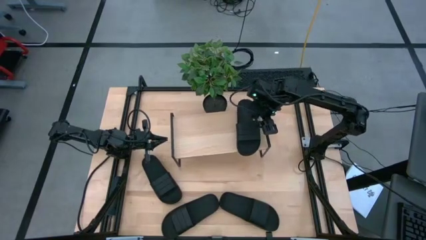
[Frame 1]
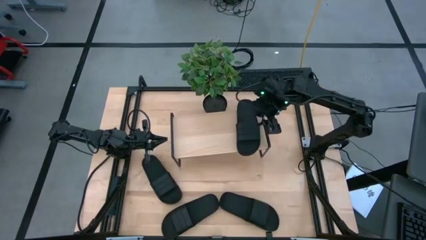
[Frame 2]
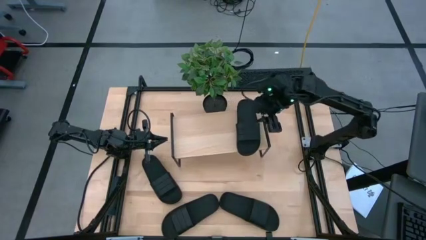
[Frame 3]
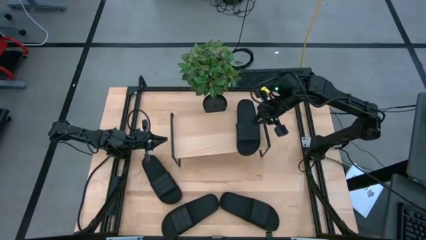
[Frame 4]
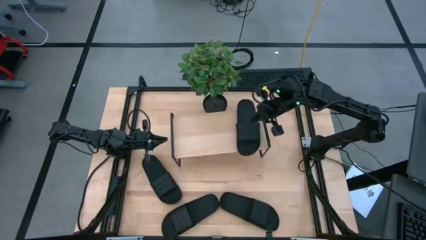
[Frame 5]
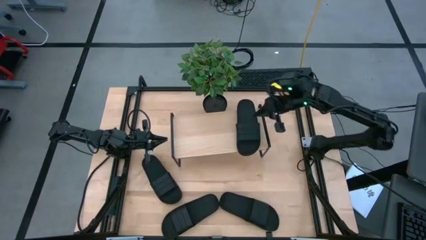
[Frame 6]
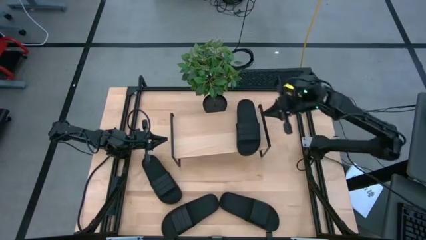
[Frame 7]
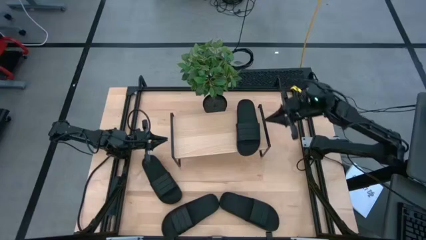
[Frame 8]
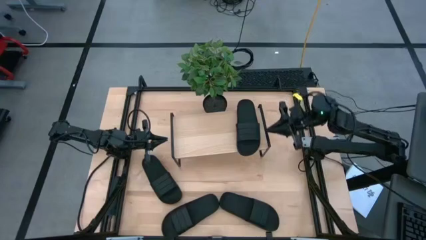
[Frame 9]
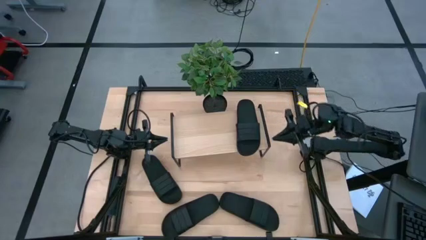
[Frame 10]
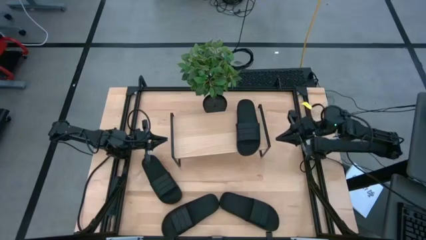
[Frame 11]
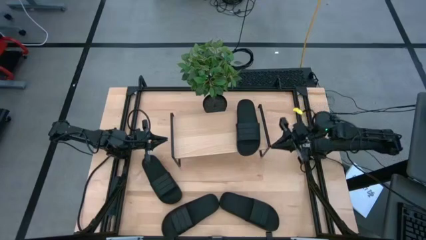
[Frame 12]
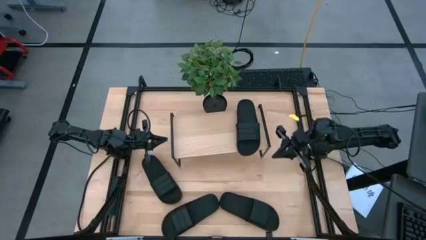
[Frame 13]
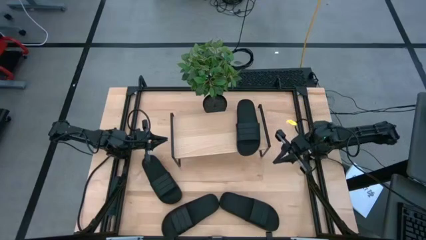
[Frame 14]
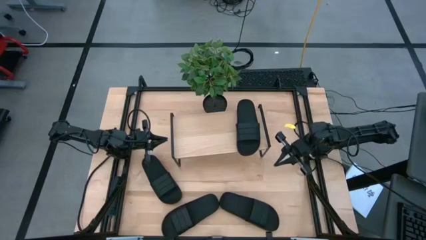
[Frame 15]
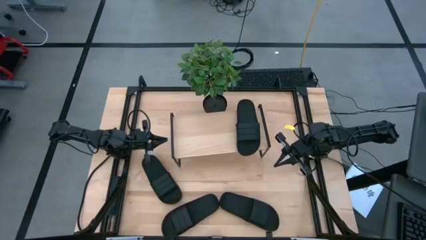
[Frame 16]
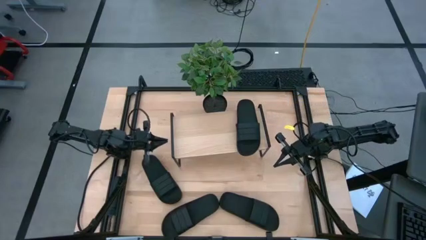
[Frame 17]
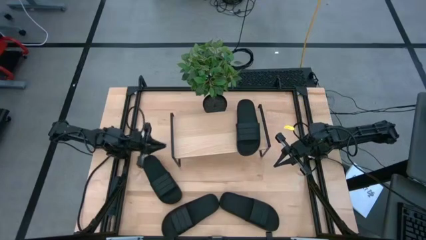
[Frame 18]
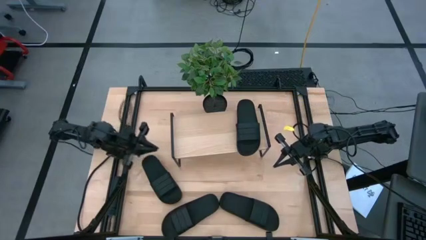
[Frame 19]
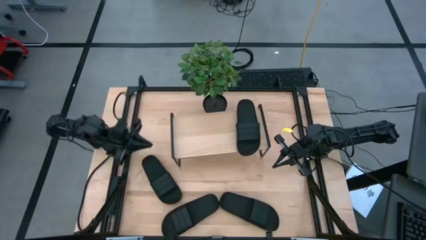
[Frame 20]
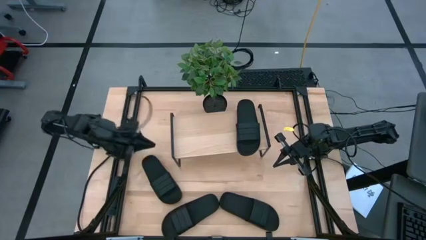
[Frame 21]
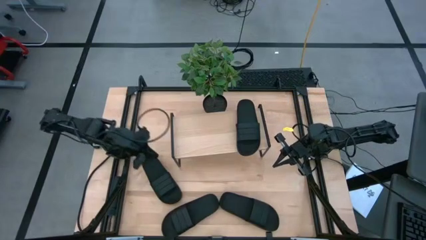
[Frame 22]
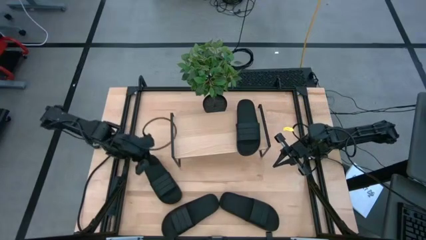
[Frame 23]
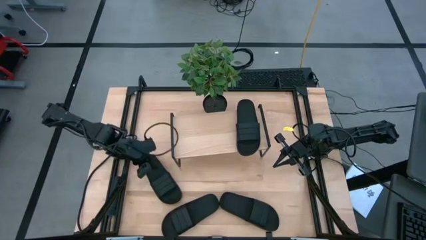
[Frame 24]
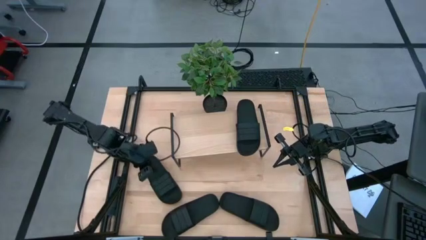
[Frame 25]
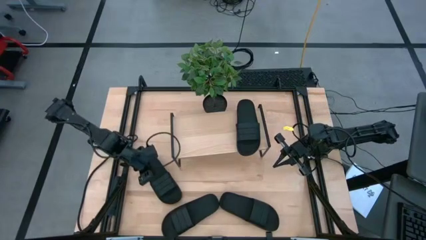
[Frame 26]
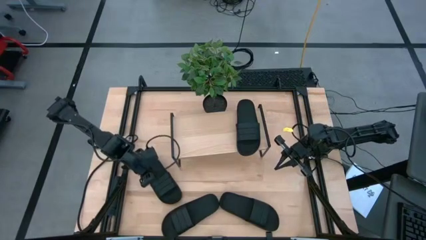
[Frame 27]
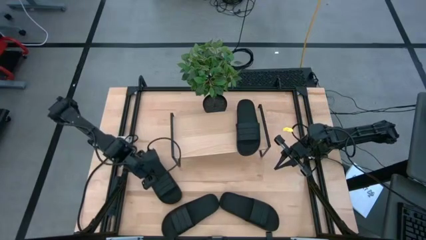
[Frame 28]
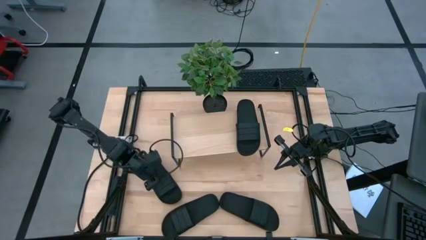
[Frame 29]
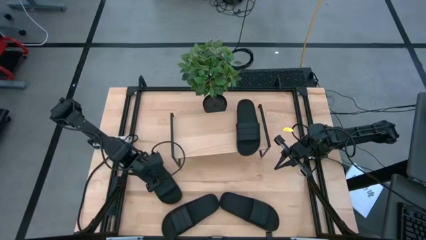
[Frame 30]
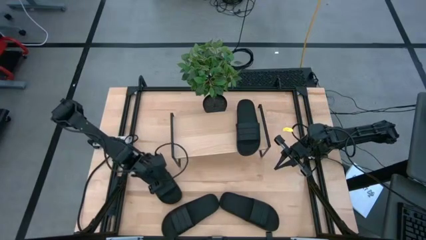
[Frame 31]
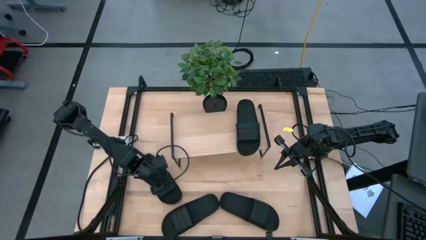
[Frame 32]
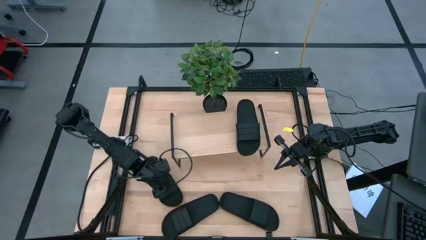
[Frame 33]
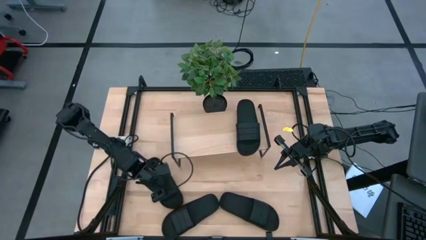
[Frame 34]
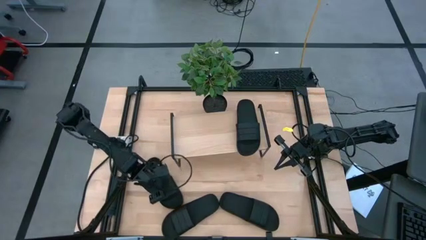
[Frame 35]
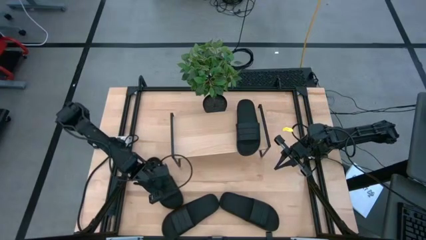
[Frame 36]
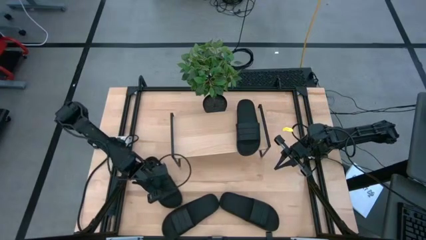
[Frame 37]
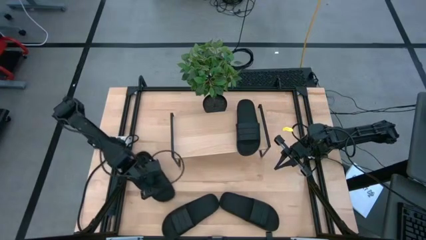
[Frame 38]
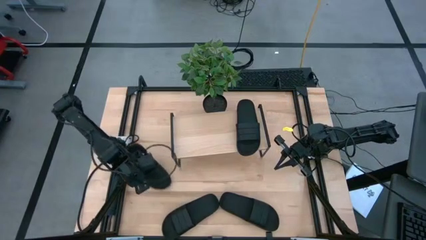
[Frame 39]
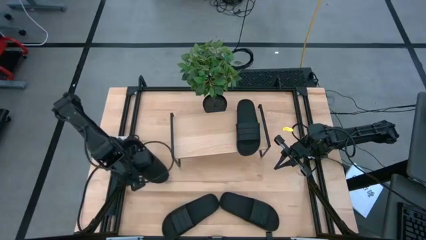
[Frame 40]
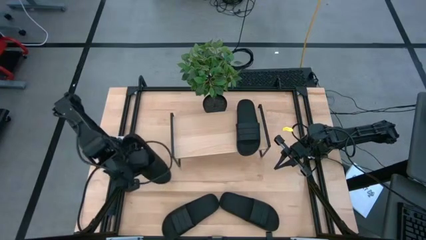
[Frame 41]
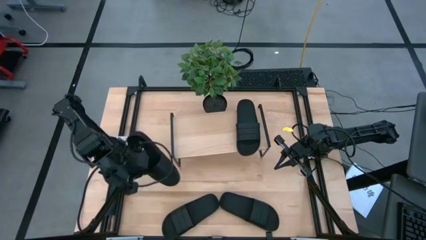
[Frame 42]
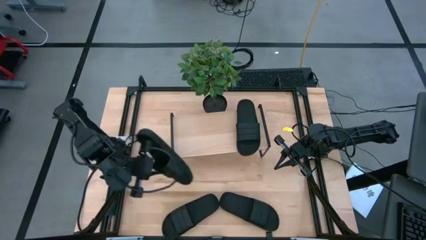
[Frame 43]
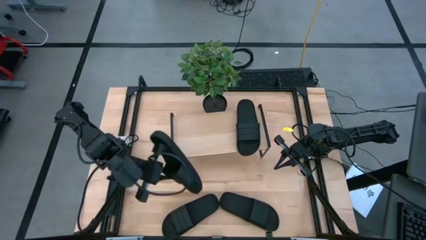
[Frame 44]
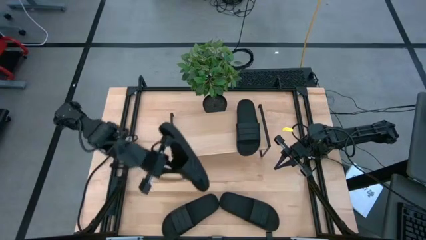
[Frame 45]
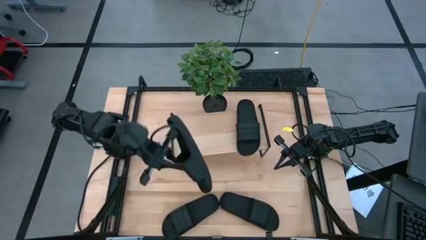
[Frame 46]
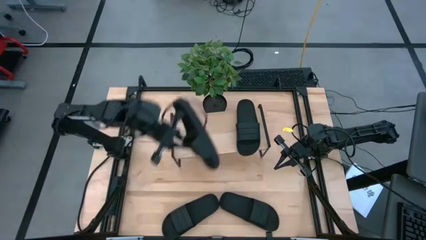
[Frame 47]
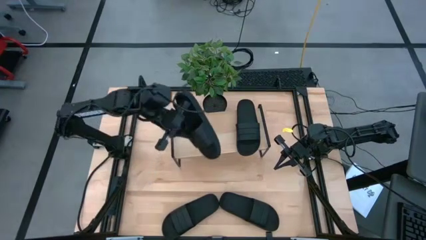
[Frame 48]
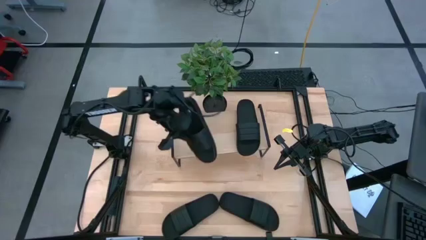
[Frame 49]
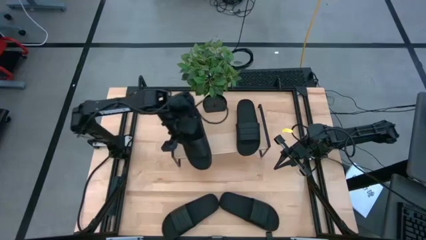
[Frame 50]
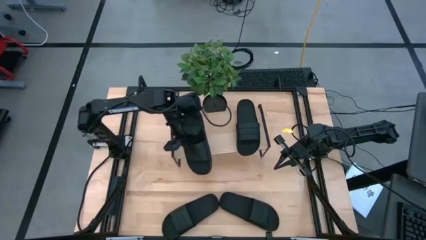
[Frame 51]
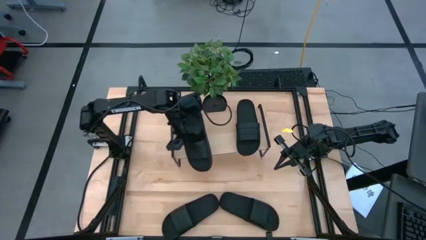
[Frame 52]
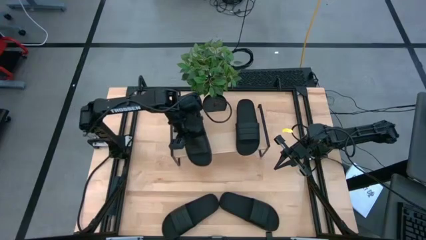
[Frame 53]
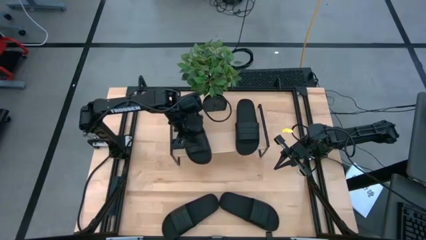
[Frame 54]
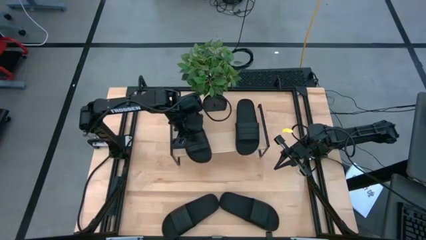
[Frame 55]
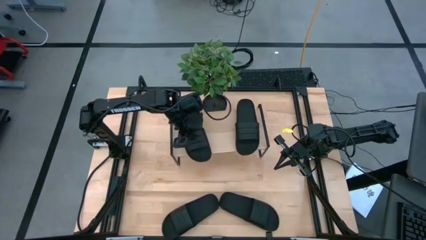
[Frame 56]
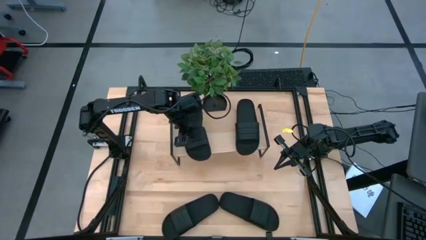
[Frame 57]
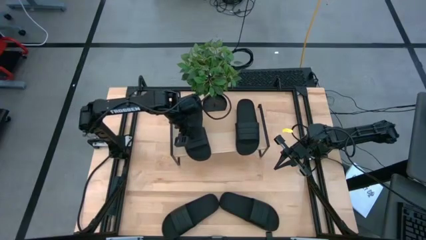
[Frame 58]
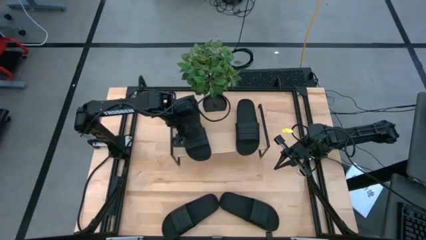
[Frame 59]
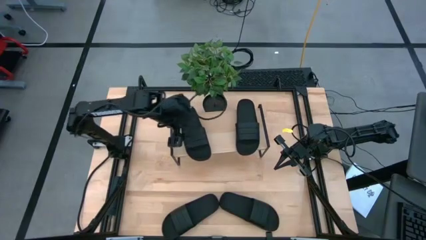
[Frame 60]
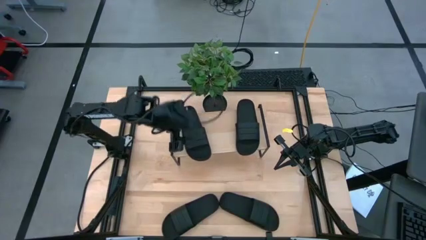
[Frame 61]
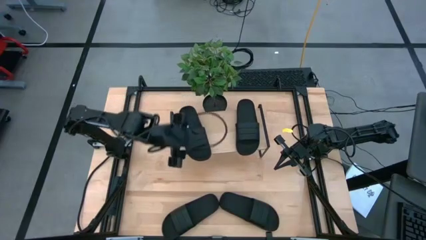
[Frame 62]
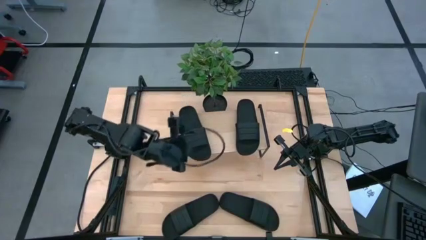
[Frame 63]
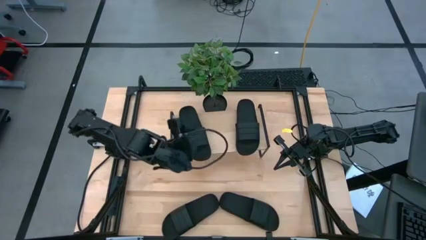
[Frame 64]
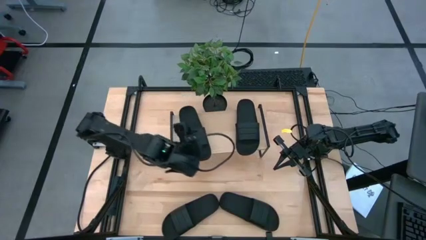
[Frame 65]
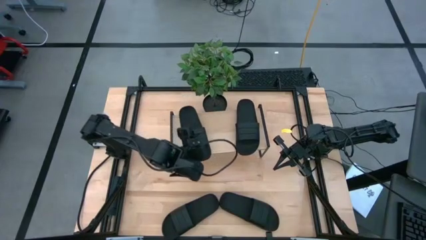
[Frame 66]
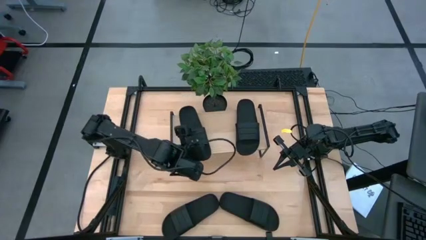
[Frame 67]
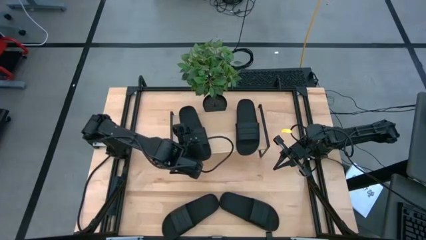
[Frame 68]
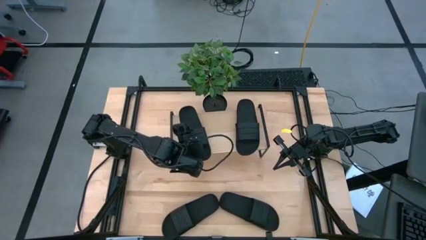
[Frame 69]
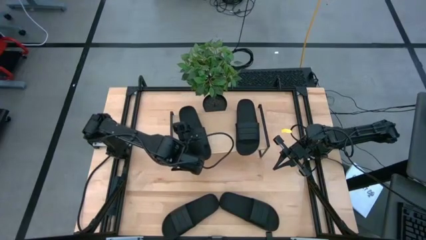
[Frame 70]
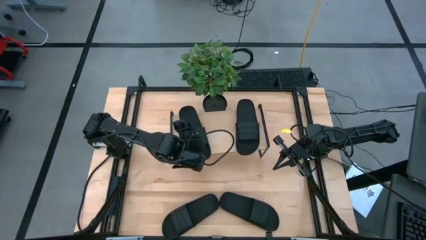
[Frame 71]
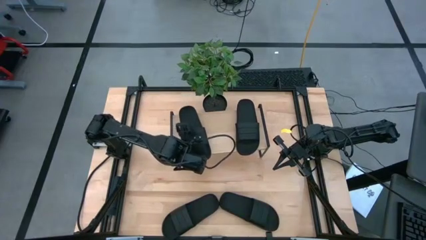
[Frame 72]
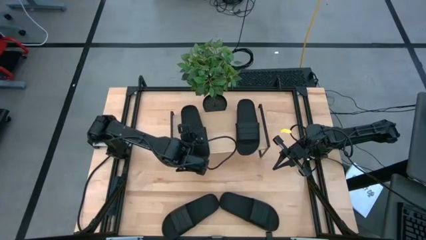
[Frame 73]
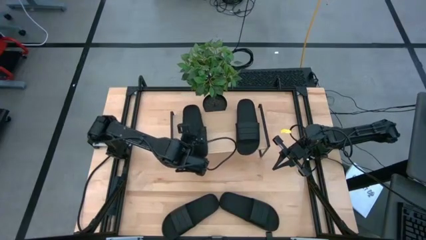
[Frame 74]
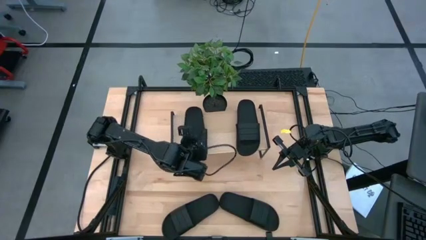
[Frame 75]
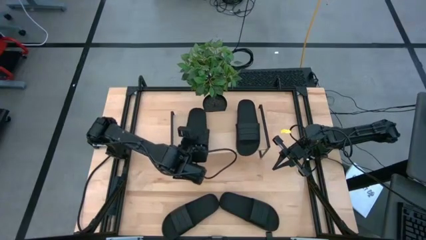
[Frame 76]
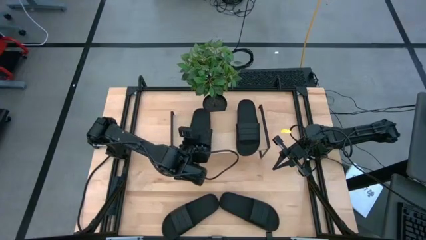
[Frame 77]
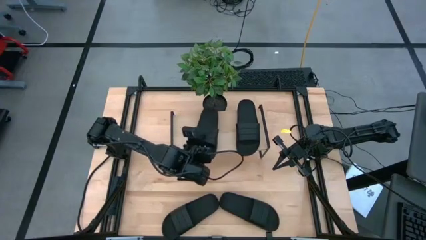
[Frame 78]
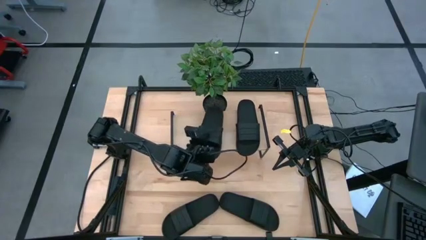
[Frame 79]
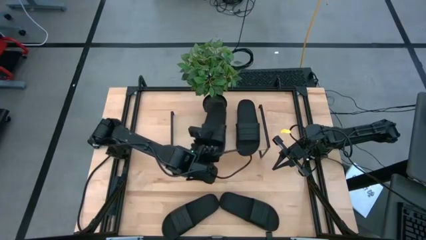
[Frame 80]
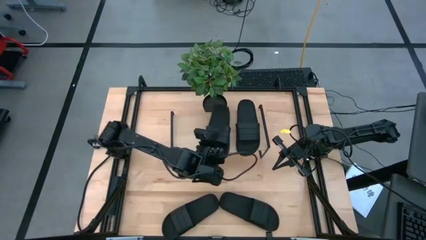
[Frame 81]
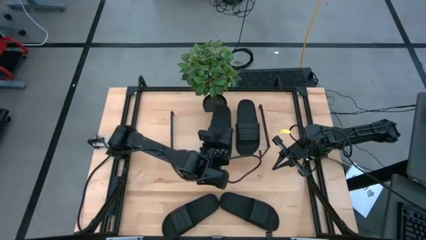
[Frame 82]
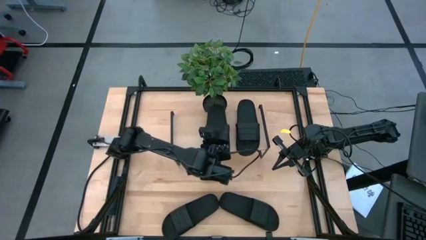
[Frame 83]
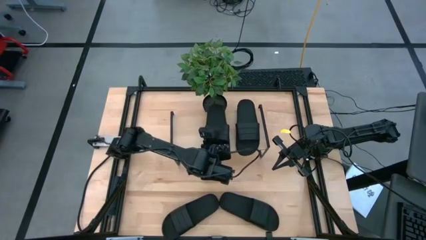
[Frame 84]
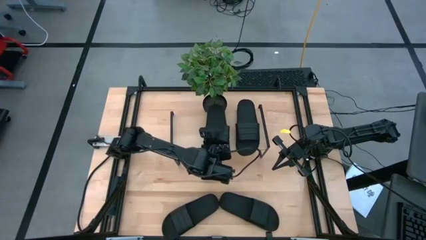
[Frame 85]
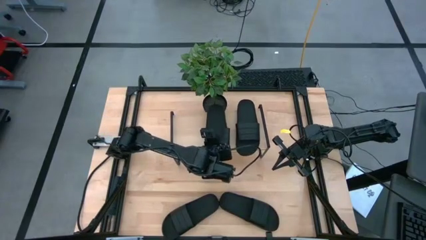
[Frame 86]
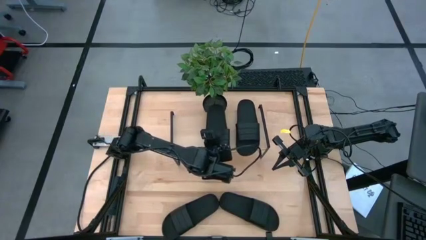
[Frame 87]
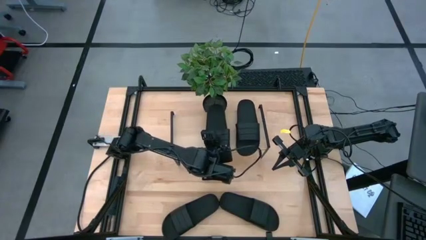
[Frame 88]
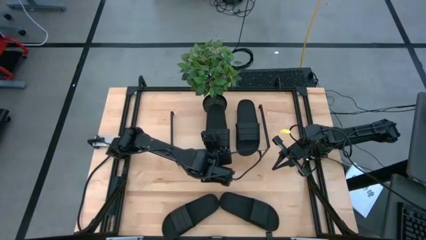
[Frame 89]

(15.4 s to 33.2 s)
Task: Pick and place slides into the shelf
Put the black slide on the shelf
